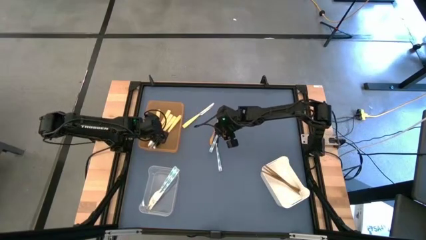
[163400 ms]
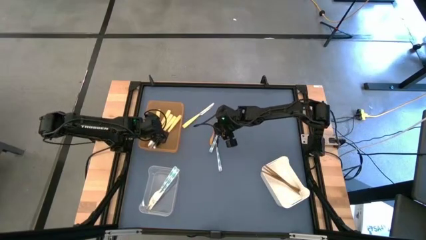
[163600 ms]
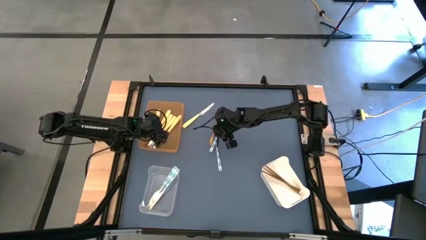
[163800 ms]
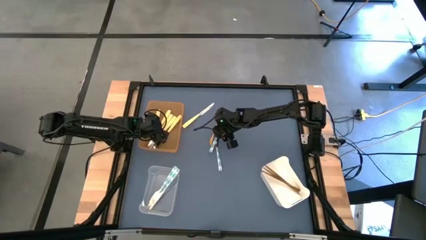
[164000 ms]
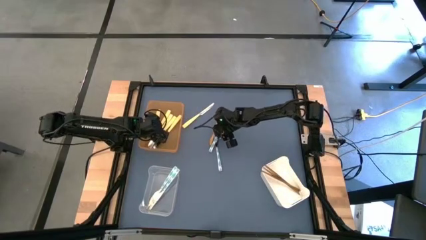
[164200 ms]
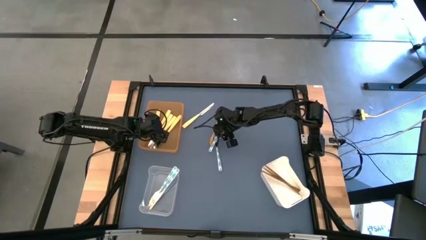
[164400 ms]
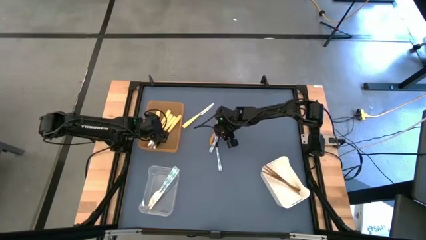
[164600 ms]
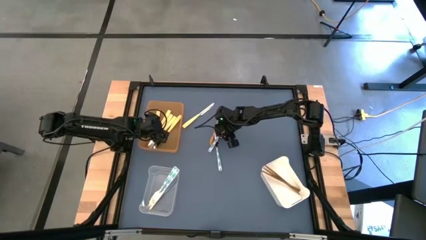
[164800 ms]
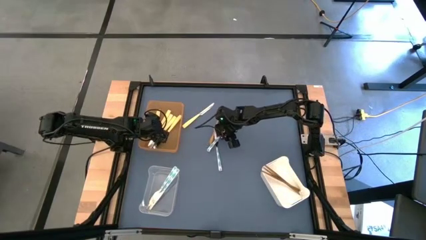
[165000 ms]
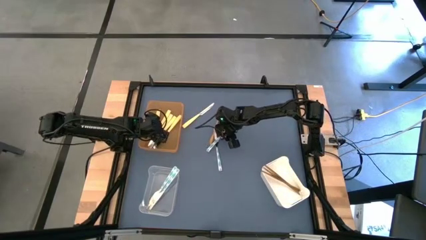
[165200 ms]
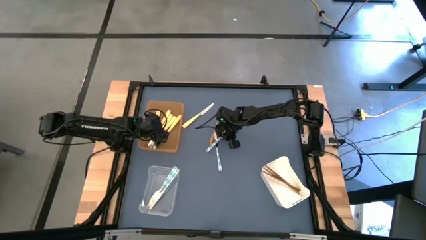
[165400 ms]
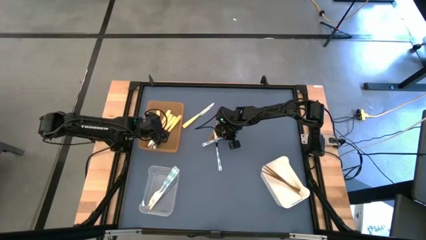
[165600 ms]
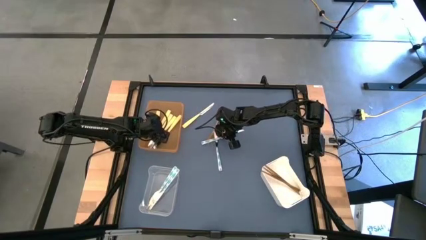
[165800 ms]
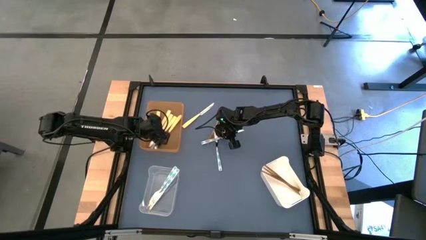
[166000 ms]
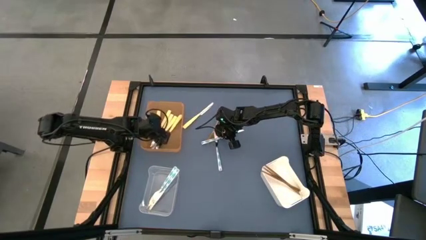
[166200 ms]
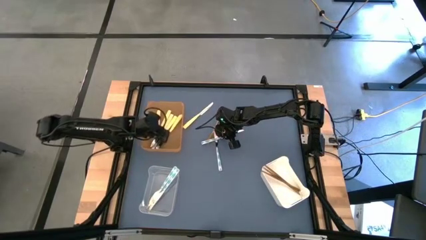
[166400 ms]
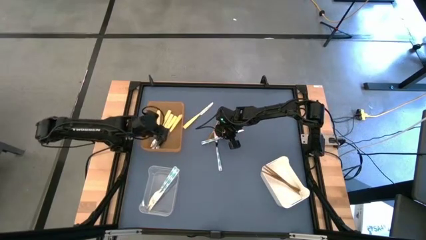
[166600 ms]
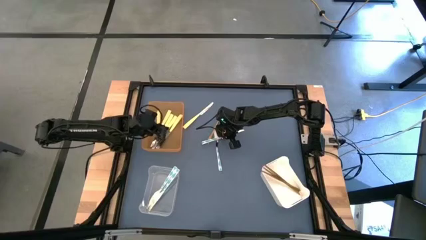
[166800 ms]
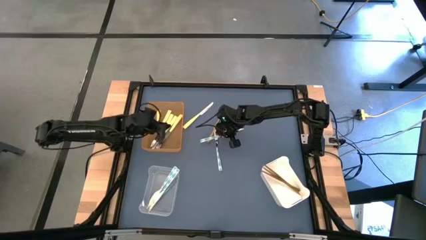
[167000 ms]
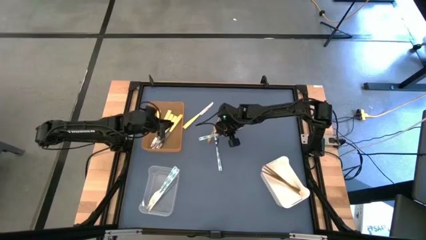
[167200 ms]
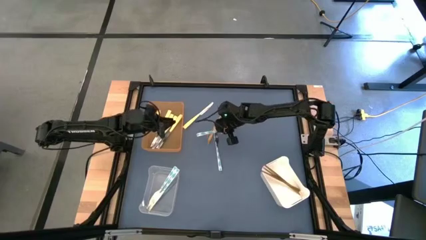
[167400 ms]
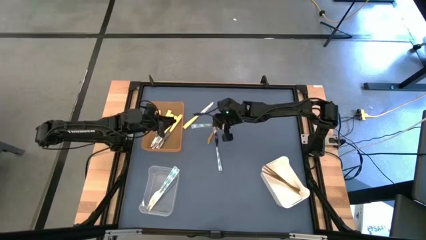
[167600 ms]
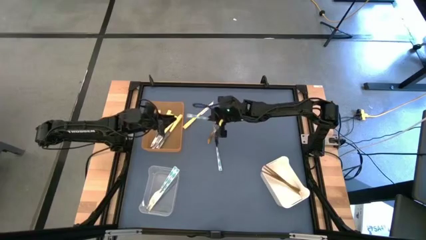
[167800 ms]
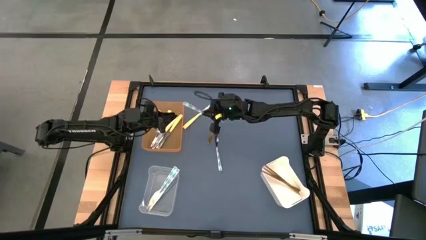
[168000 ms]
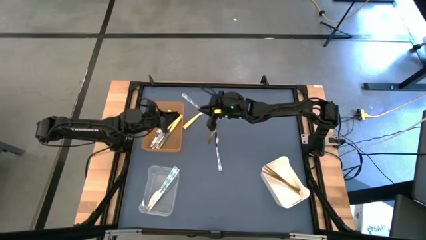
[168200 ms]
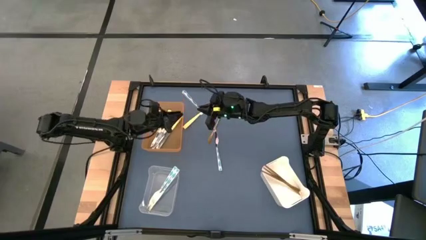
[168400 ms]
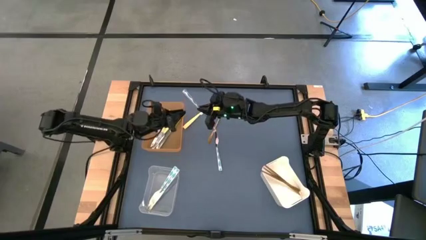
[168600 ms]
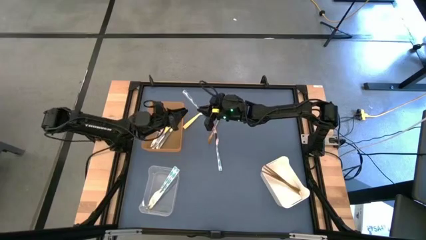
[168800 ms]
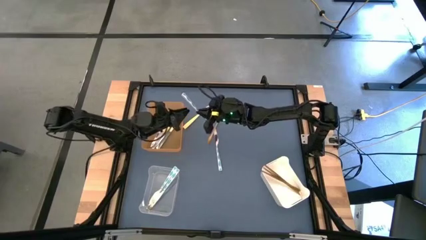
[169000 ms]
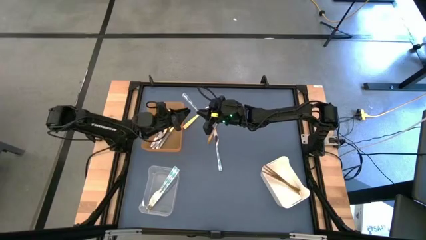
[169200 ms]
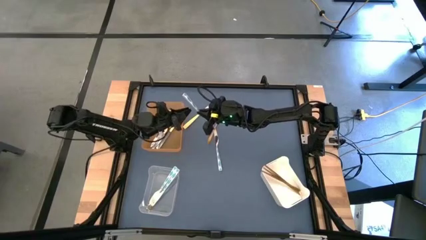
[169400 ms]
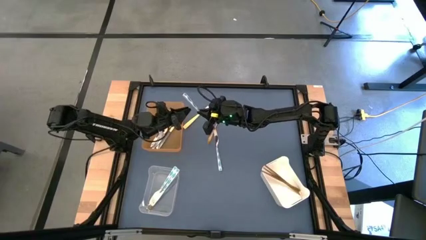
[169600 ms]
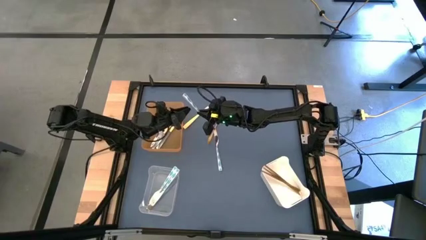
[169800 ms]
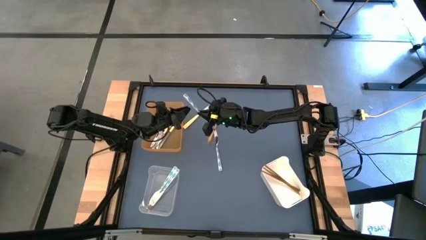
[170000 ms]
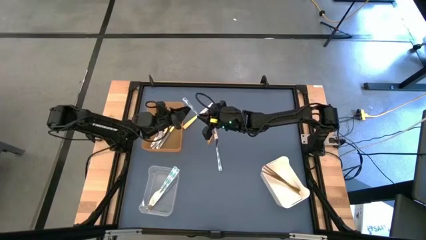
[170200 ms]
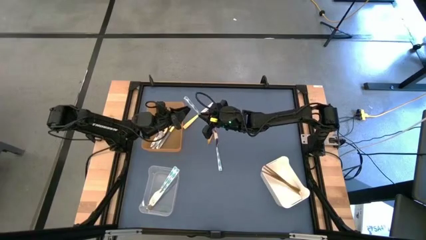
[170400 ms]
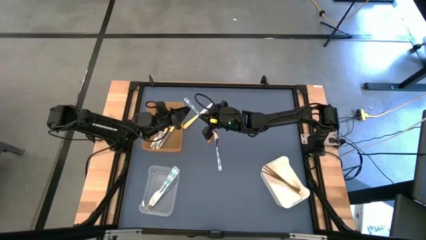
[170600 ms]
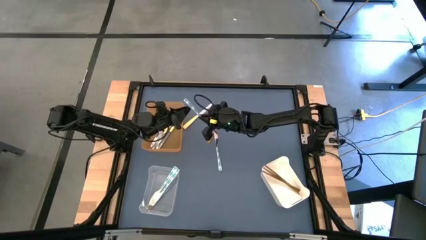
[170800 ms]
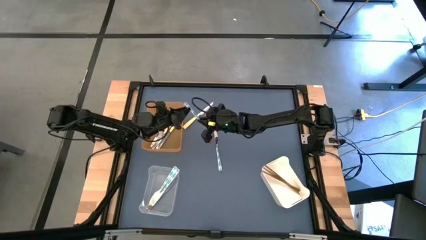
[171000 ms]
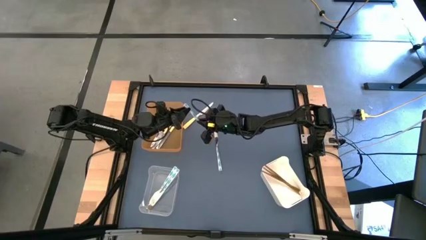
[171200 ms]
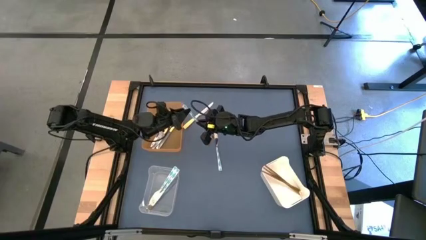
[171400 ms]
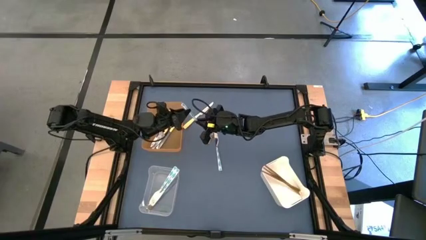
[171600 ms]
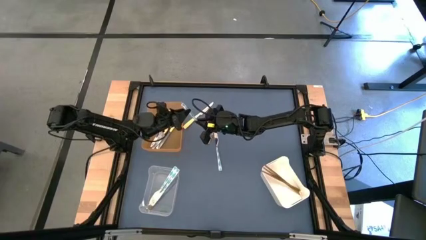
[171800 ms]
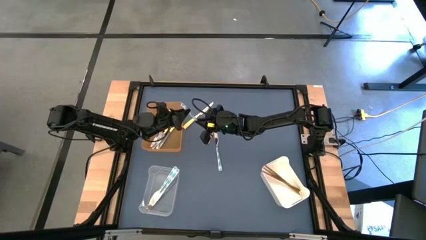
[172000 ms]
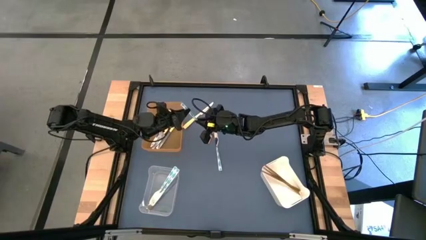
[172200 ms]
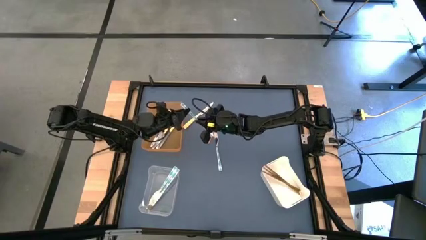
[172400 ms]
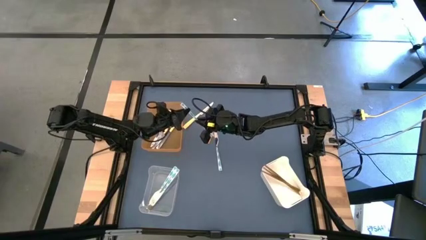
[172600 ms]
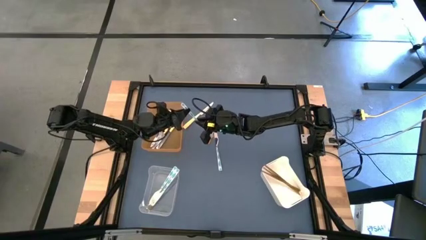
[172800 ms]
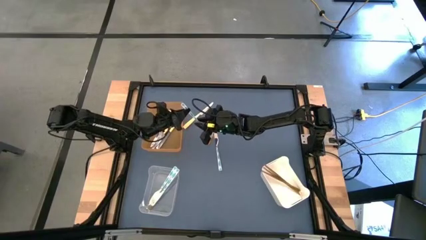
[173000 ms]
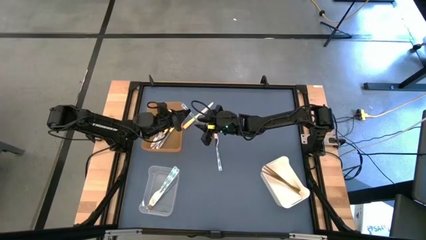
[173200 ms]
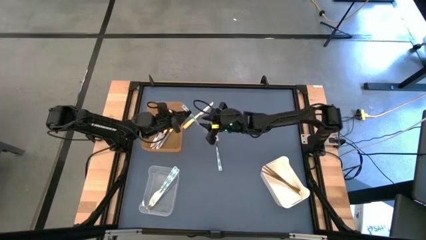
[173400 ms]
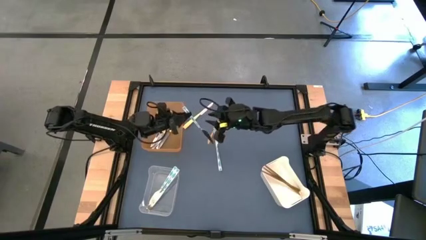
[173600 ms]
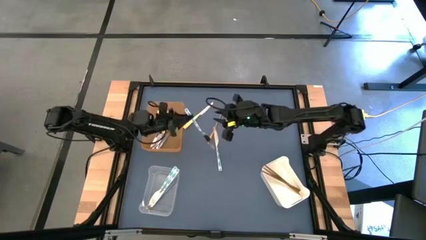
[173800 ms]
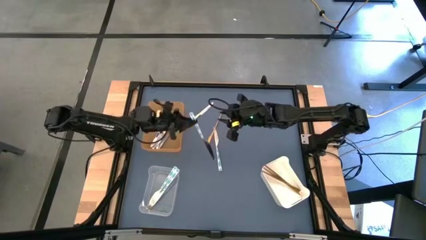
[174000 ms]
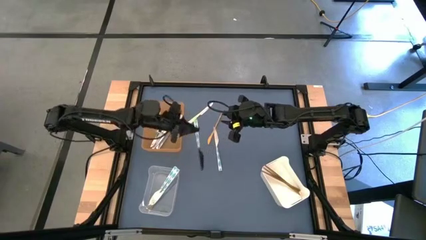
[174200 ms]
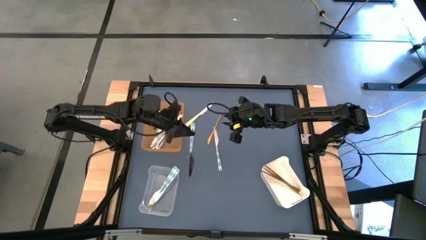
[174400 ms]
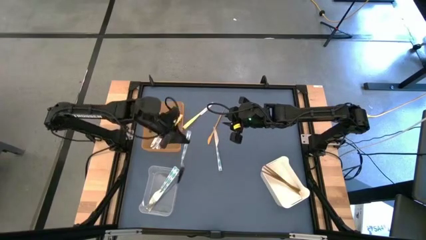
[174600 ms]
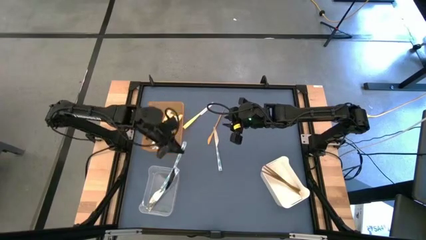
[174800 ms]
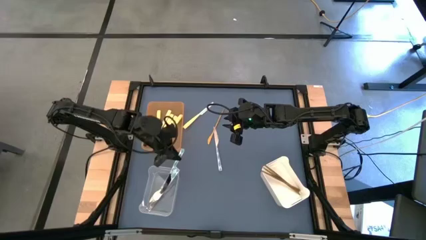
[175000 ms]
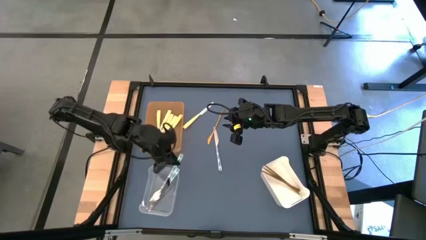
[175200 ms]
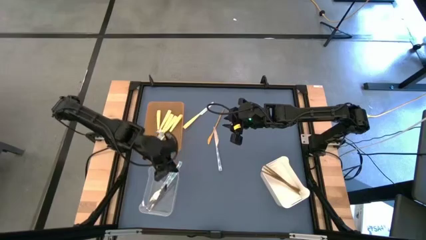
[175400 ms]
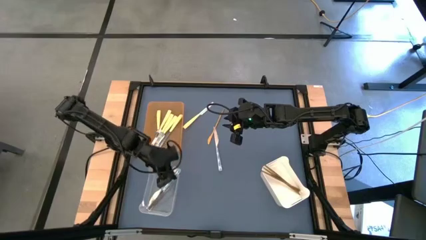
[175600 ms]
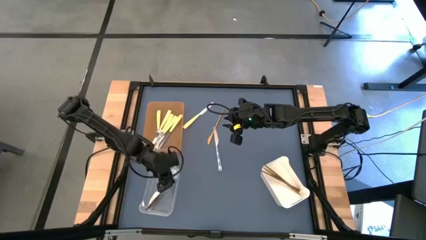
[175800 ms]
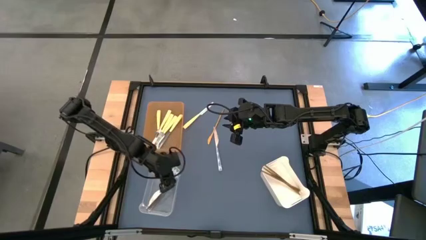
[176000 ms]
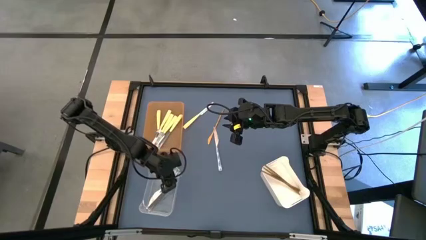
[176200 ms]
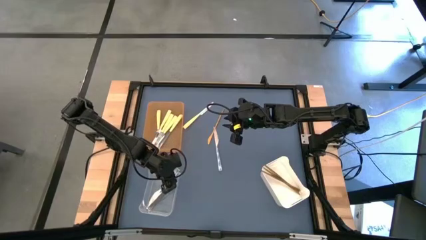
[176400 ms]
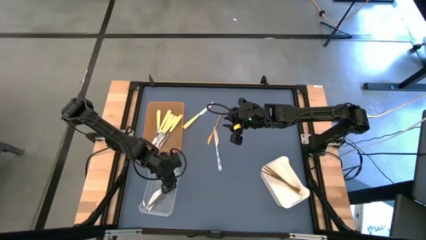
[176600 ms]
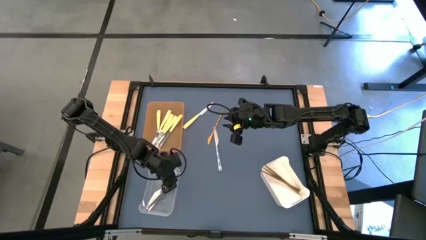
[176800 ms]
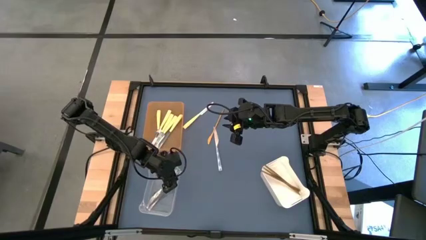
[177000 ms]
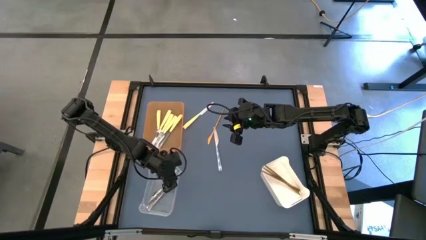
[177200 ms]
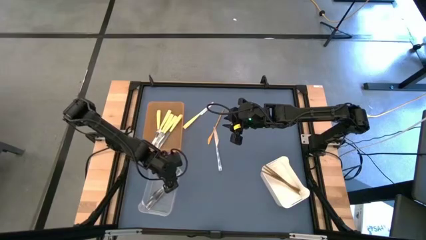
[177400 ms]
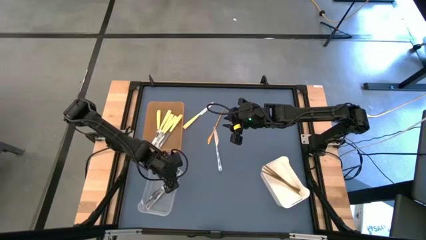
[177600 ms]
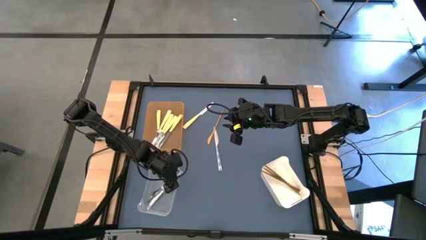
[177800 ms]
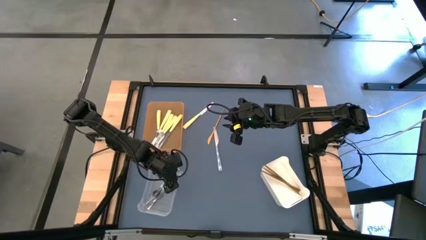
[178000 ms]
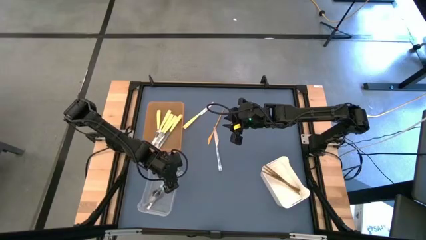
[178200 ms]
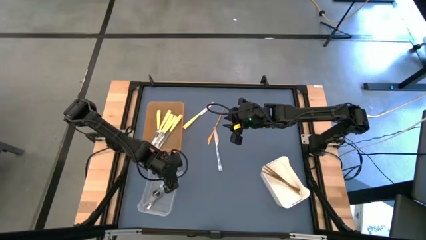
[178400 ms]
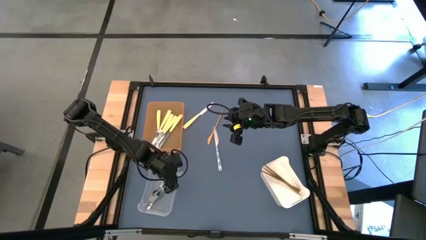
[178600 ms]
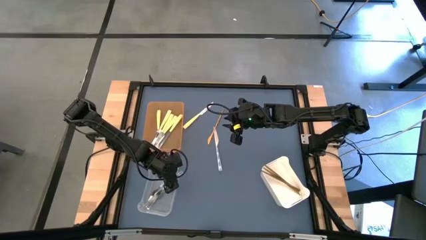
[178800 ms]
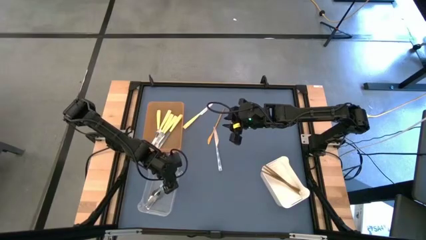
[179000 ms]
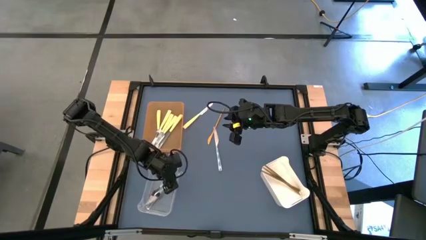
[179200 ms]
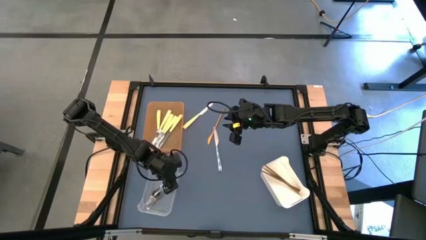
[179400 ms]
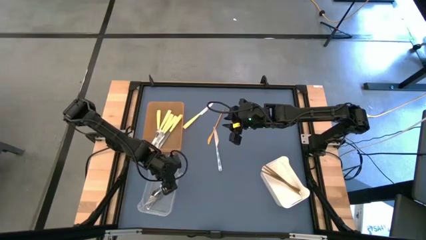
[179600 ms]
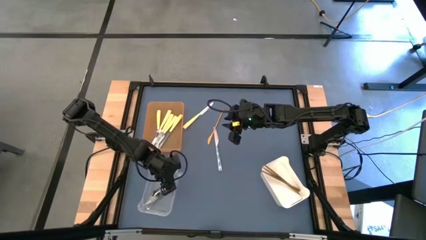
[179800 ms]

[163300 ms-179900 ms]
Task: Sort silverware by color (type)
Put the green knife into the transparent bin
